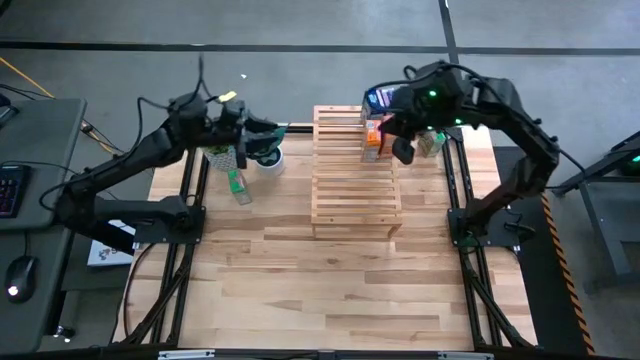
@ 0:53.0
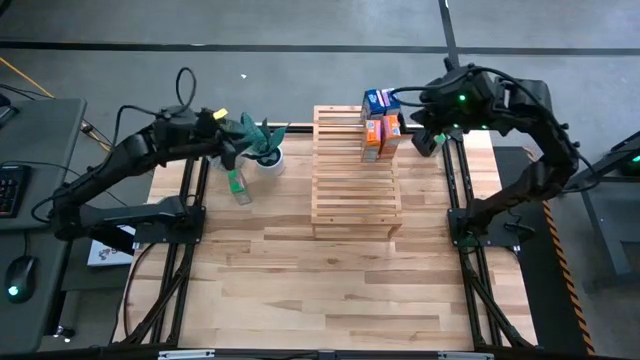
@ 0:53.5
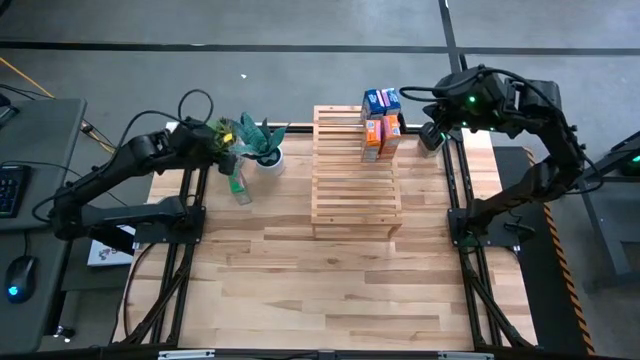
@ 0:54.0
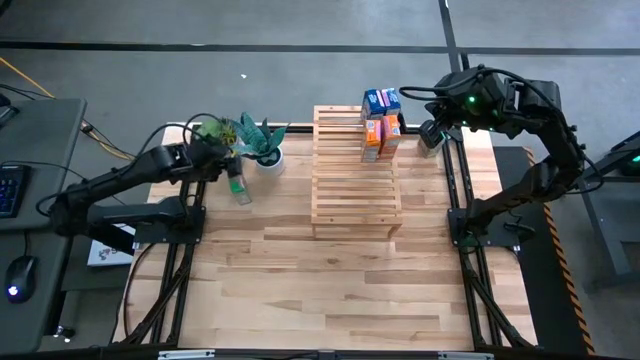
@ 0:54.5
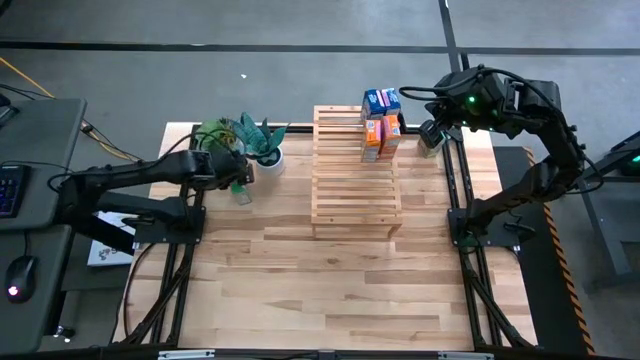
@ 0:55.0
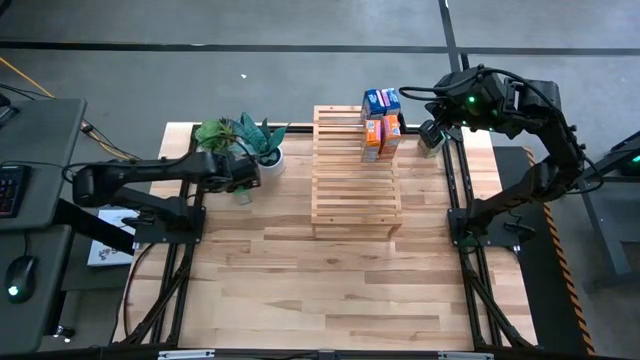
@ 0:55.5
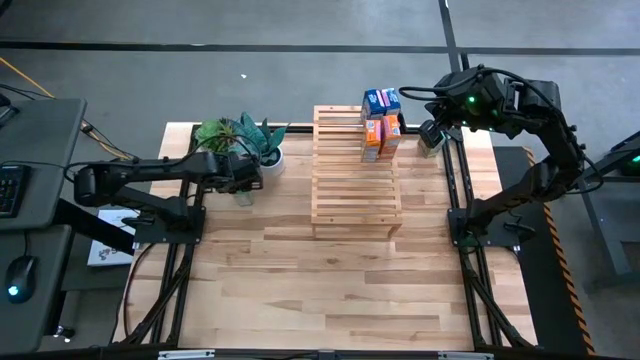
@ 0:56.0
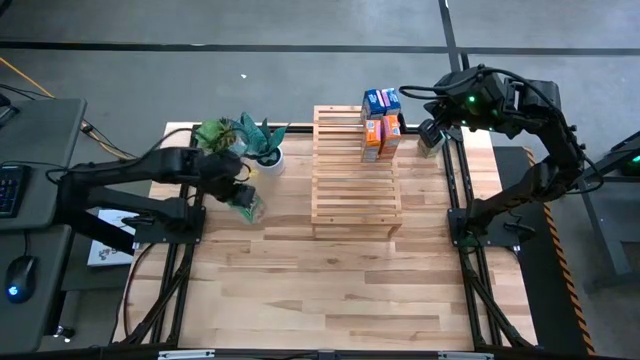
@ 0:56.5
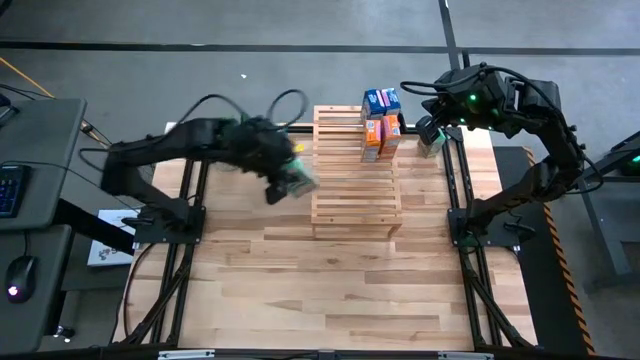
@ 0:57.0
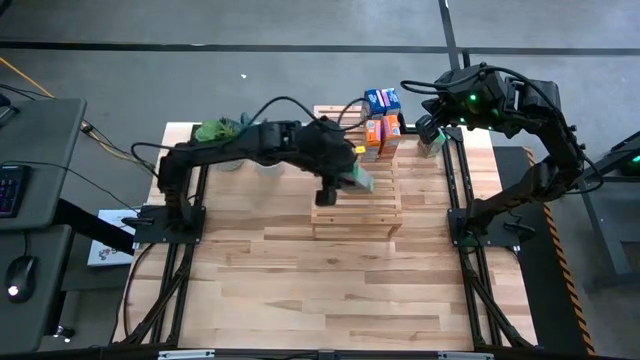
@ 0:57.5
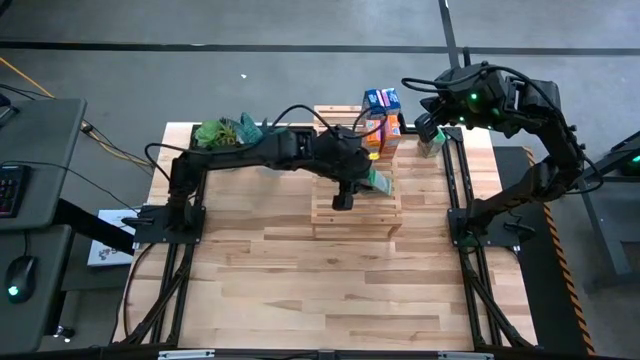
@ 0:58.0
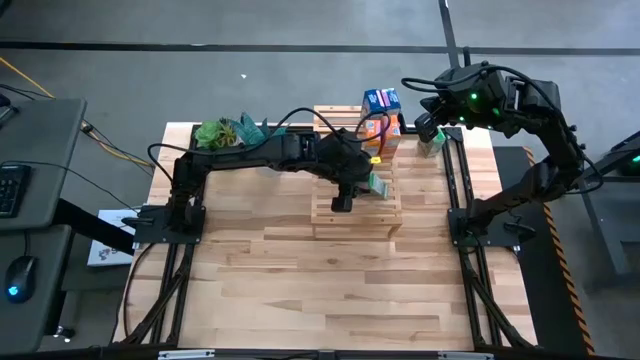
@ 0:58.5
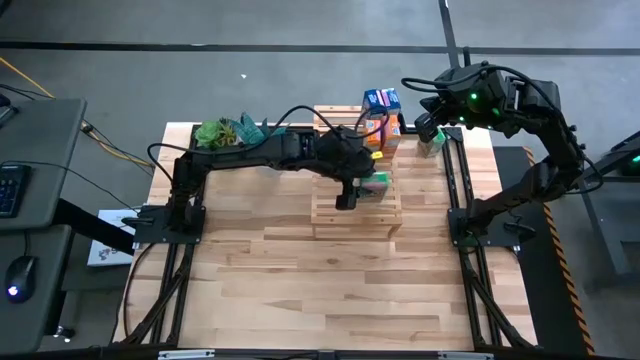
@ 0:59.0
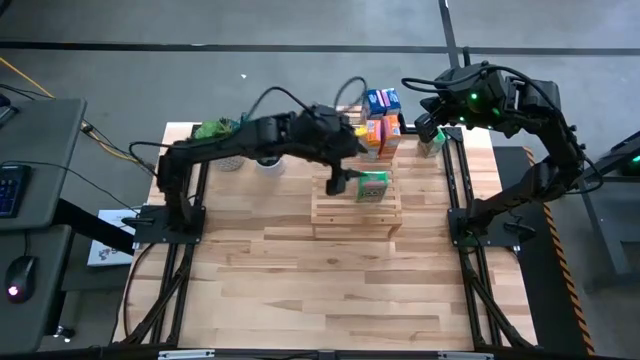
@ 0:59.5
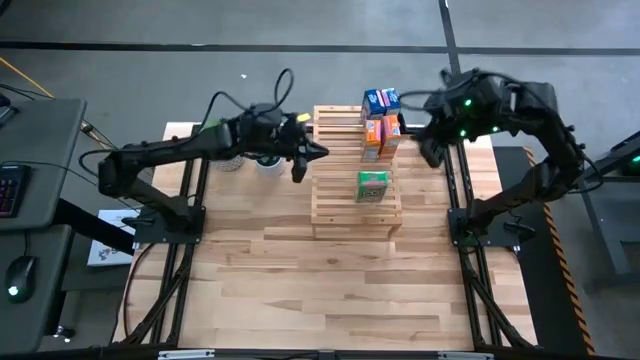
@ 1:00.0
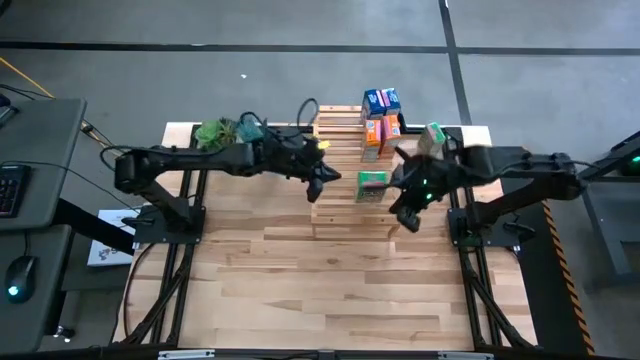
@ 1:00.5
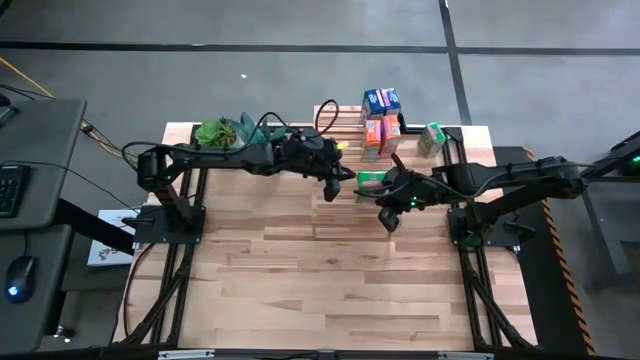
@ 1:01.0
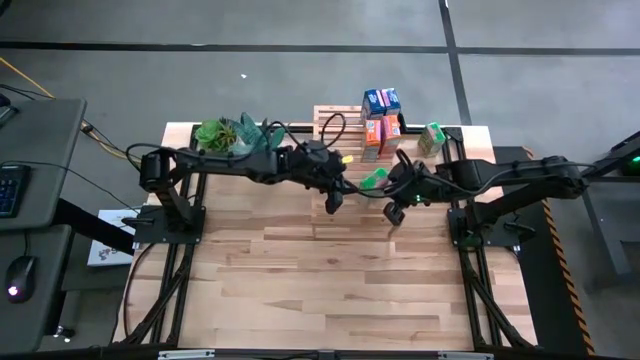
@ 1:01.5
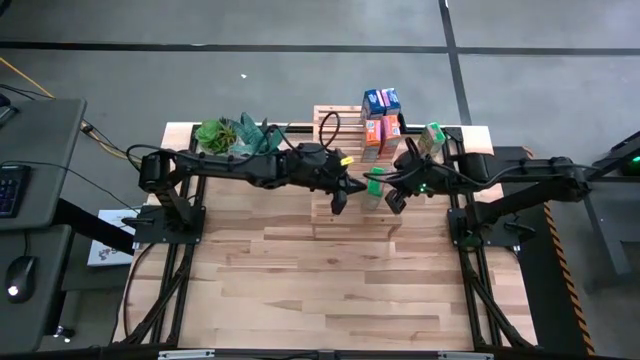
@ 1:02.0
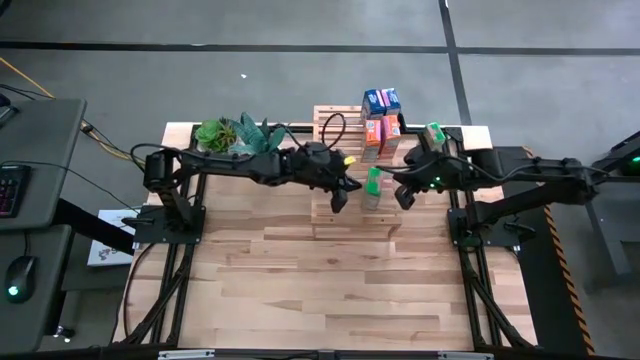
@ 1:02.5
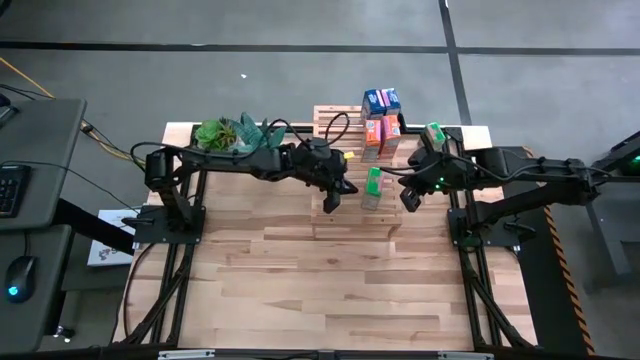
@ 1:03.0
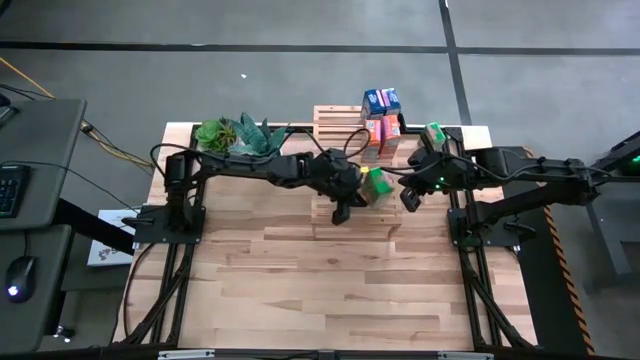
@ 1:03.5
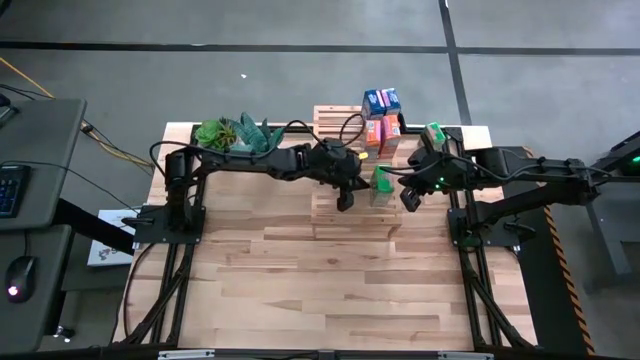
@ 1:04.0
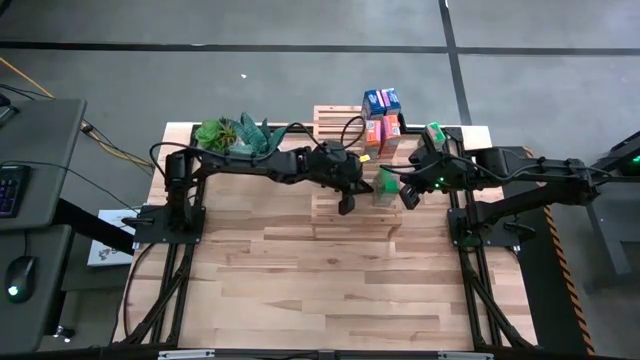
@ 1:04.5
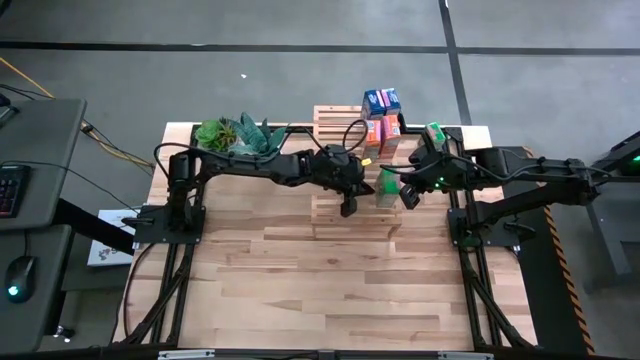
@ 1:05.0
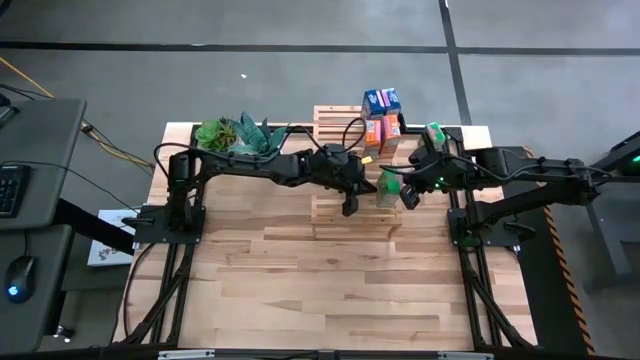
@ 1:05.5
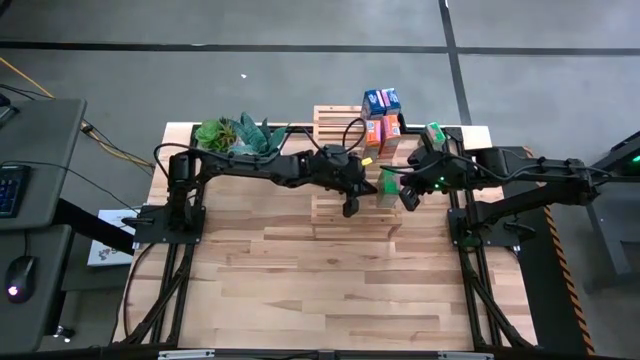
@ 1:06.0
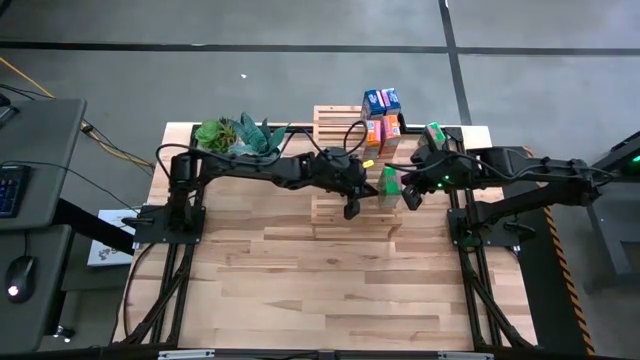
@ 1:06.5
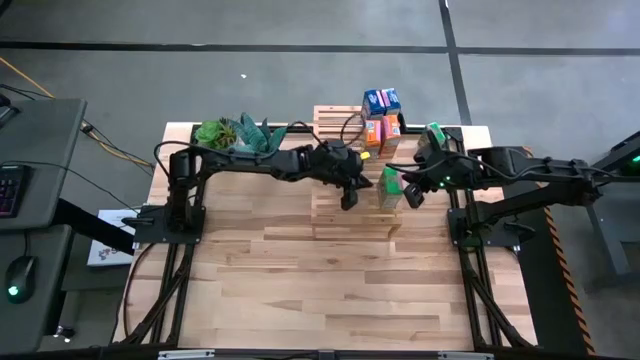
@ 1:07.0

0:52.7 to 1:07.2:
Task: Stack cereal on shelf
Put the left green cereal box on the shelf

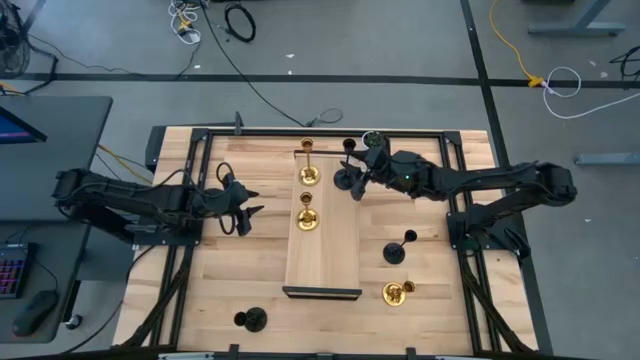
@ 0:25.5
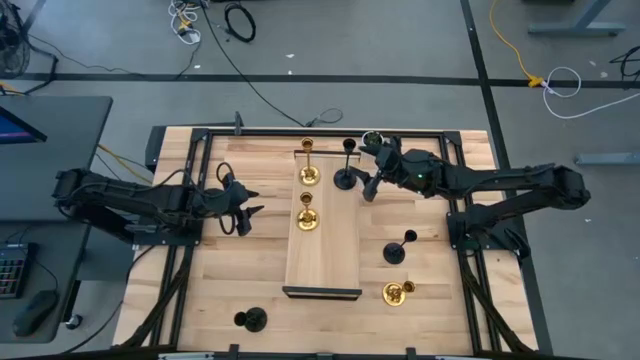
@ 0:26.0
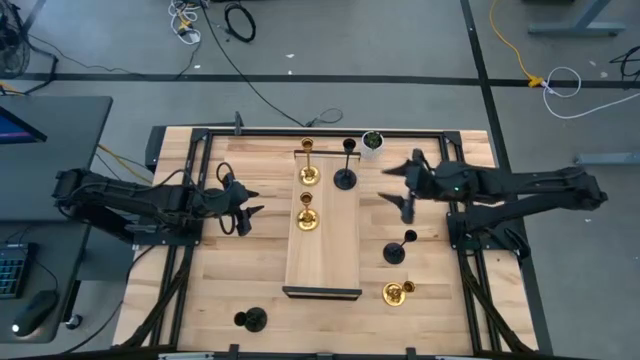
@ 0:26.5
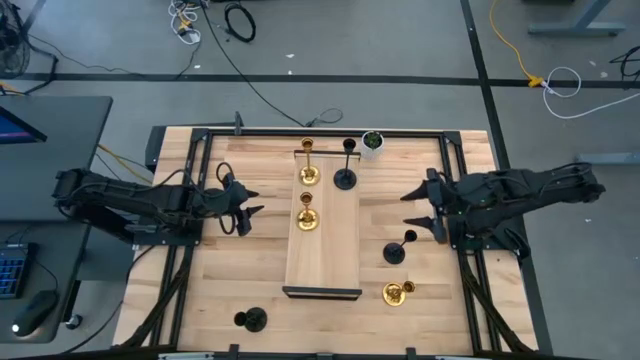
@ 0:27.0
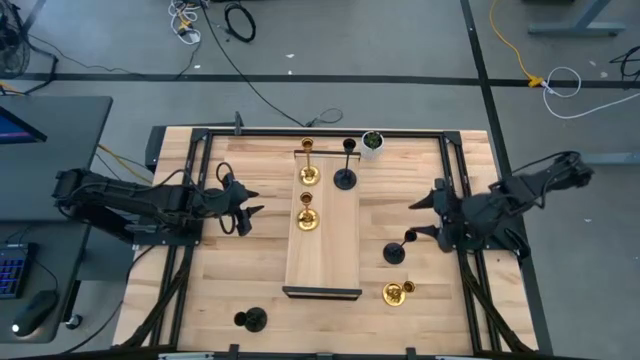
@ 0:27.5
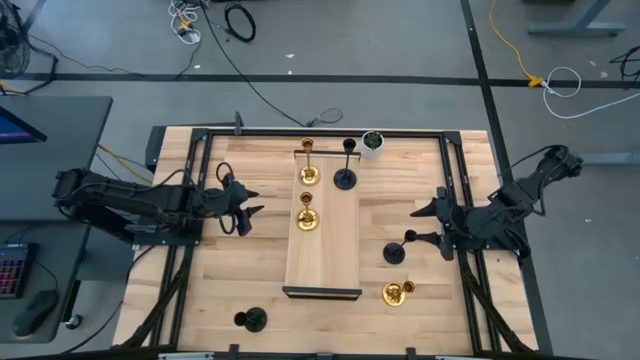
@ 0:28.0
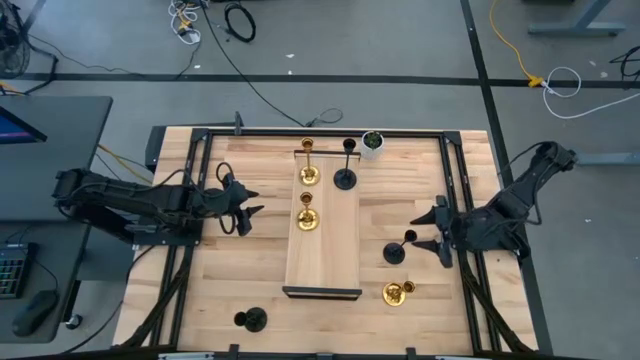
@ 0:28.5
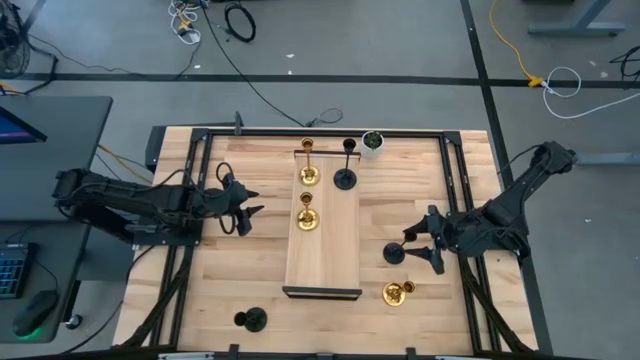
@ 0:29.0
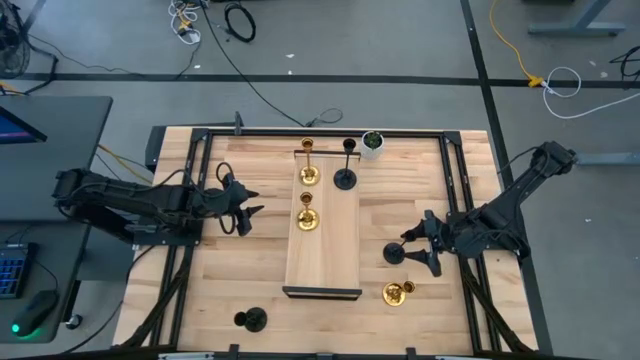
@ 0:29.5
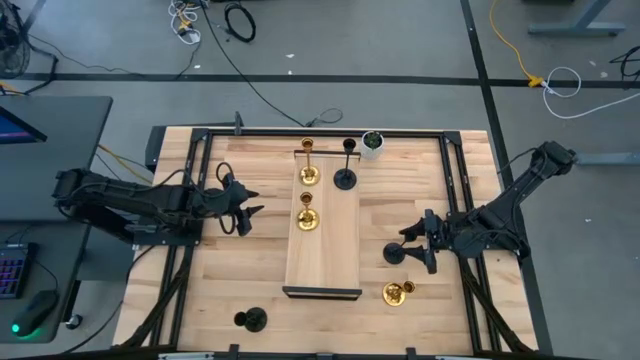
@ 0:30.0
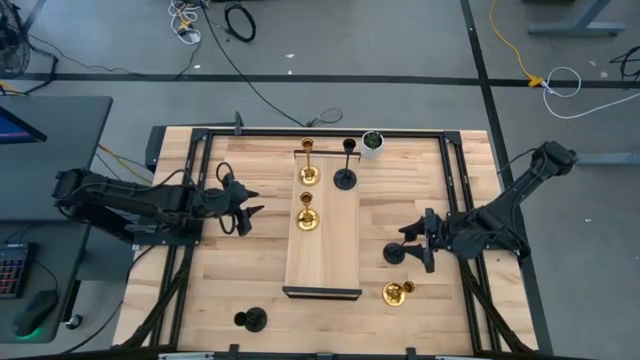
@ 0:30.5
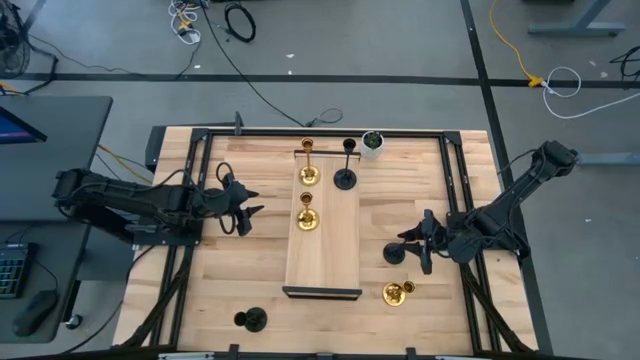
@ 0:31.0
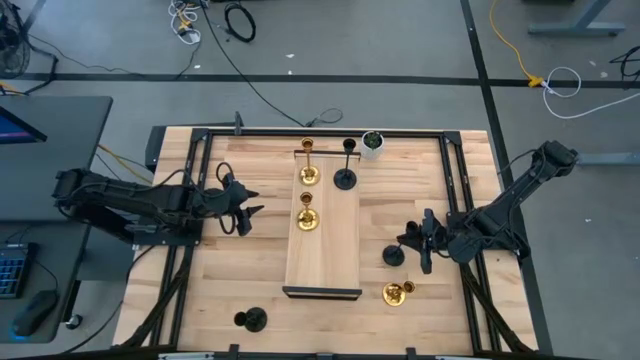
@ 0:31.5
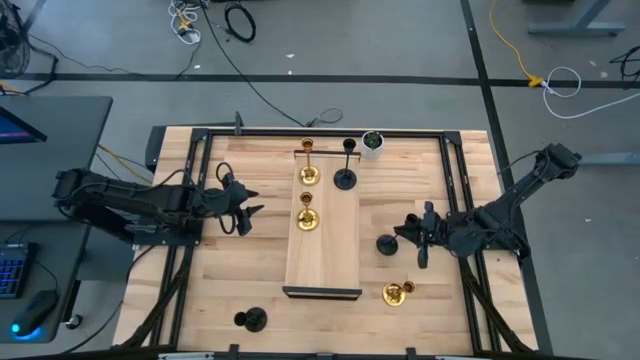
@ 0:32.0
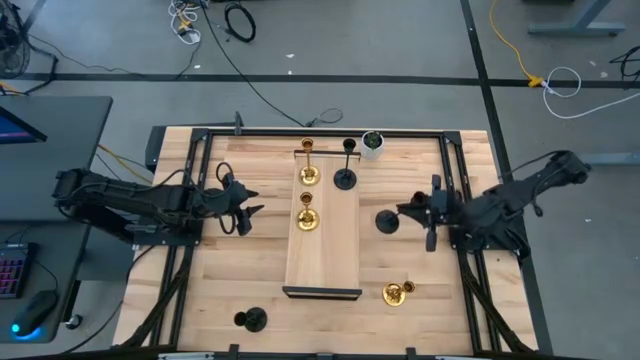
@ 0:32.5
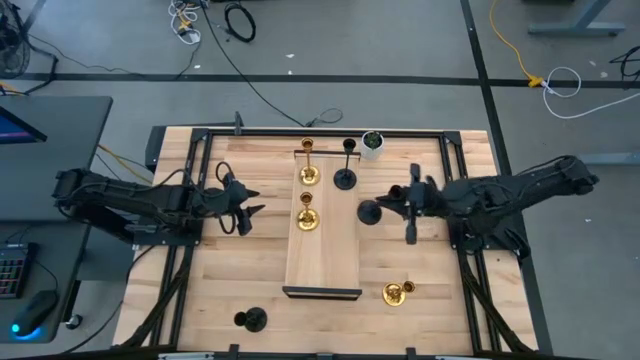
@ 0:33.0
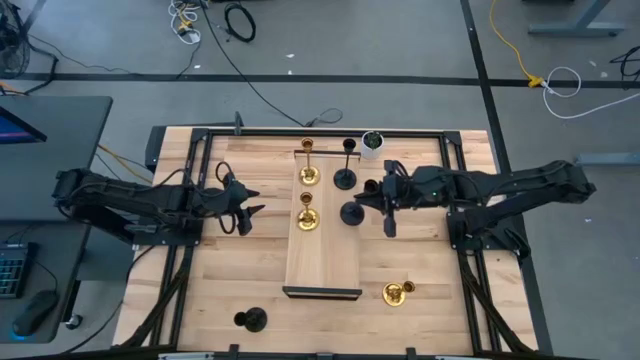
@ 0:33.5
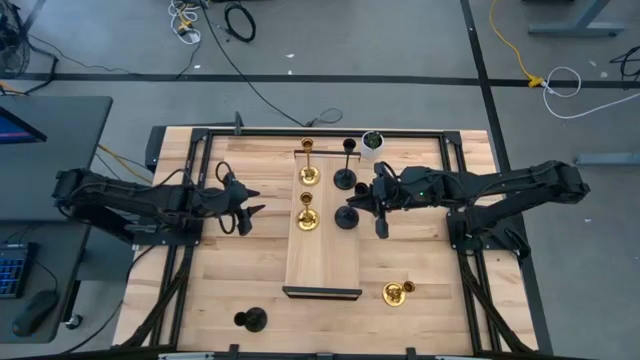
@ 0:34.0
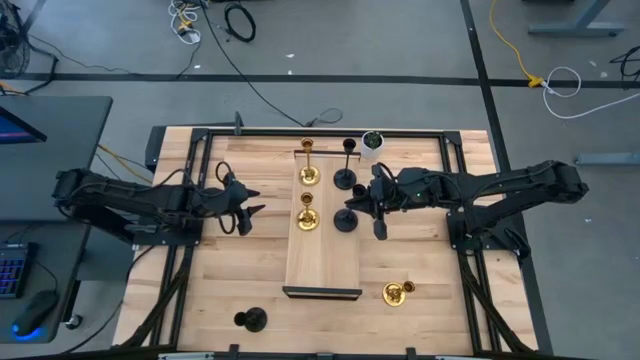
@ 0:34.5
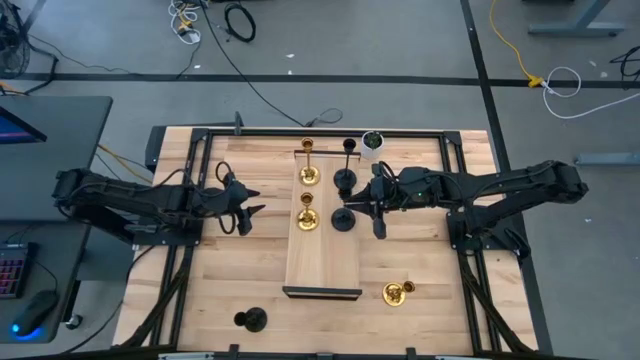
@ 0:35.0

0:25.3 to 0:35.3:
Task: Pick & Place candle stick holders
Put the top black candle holder on the shelf
